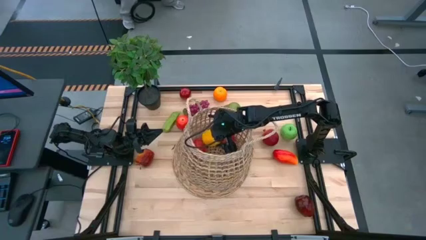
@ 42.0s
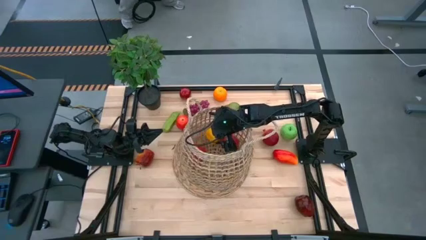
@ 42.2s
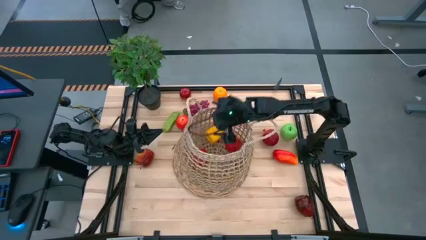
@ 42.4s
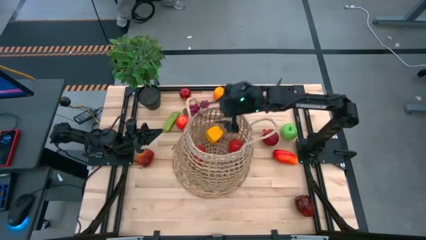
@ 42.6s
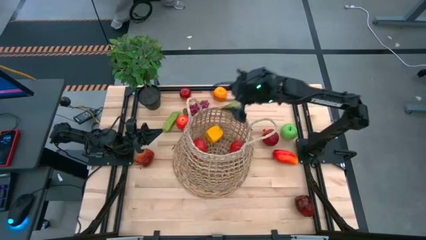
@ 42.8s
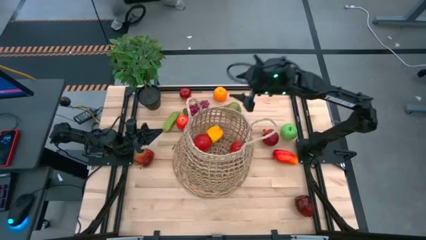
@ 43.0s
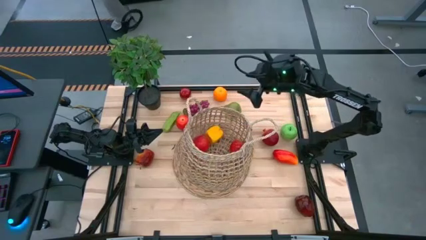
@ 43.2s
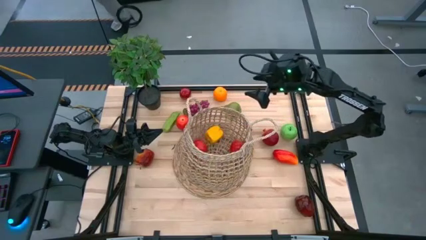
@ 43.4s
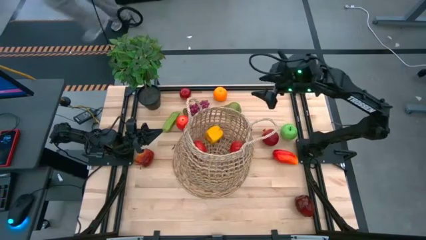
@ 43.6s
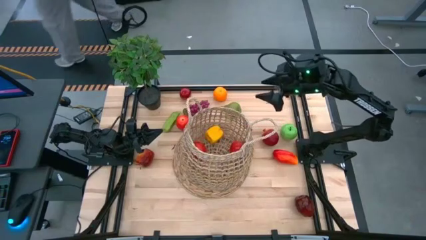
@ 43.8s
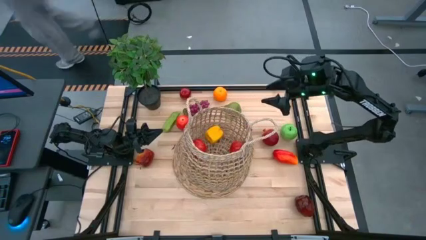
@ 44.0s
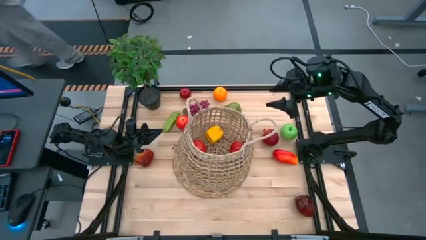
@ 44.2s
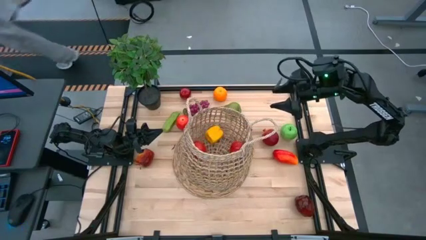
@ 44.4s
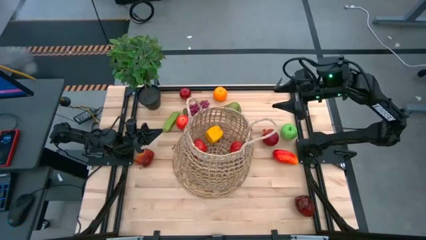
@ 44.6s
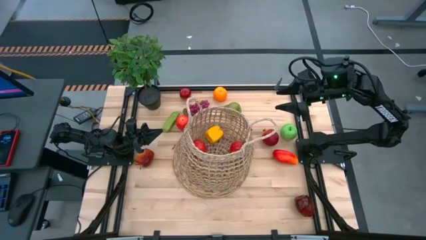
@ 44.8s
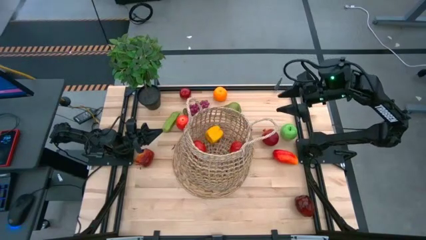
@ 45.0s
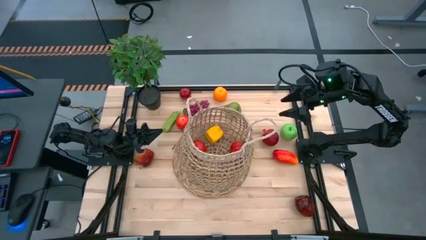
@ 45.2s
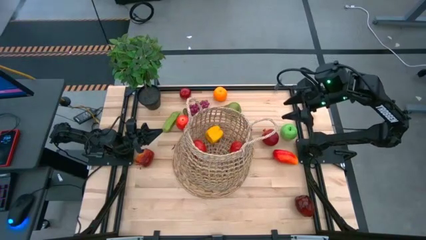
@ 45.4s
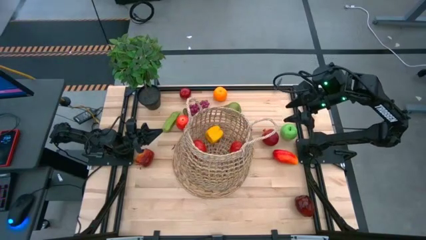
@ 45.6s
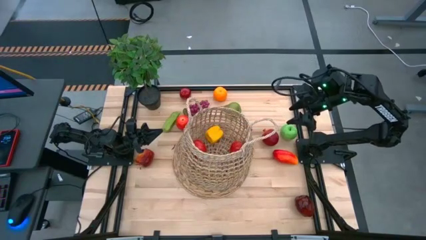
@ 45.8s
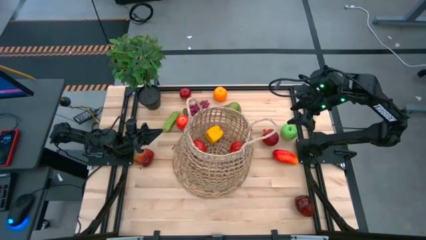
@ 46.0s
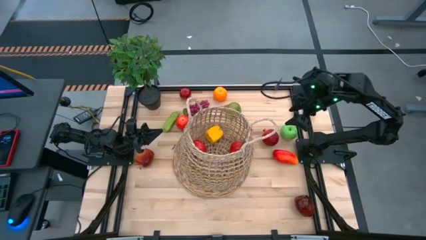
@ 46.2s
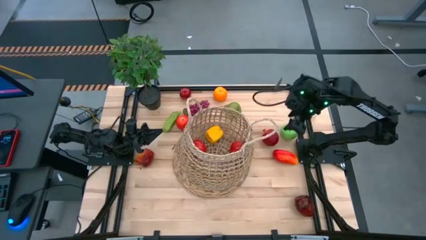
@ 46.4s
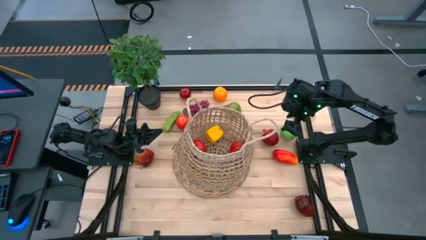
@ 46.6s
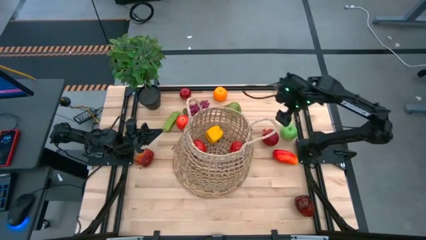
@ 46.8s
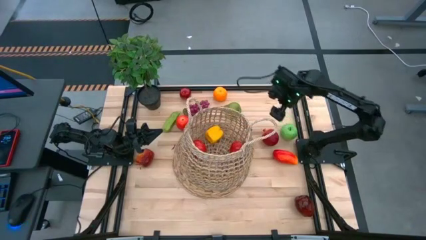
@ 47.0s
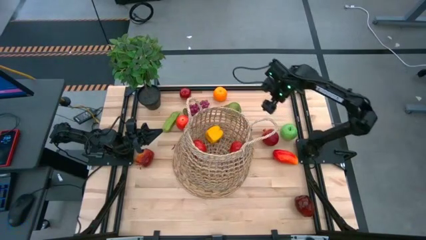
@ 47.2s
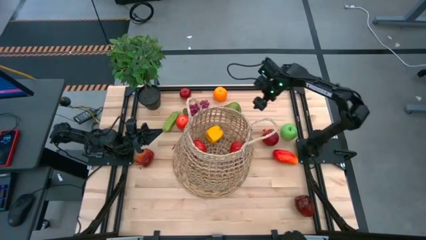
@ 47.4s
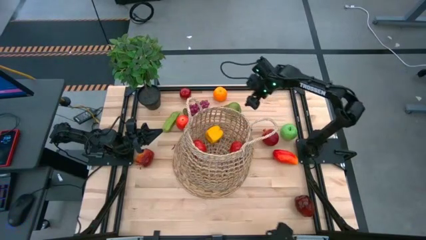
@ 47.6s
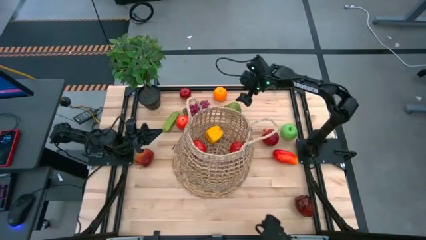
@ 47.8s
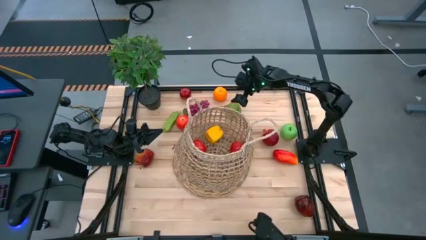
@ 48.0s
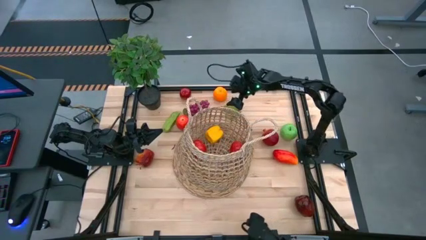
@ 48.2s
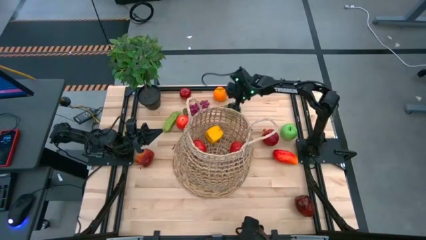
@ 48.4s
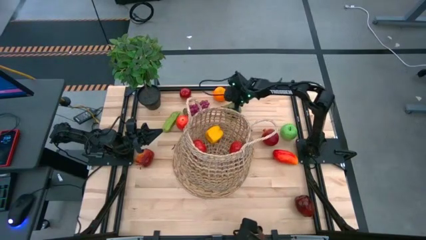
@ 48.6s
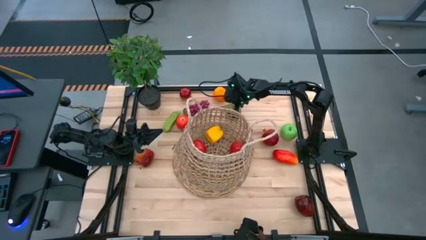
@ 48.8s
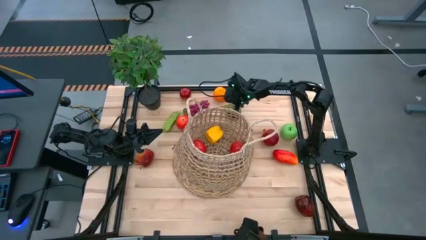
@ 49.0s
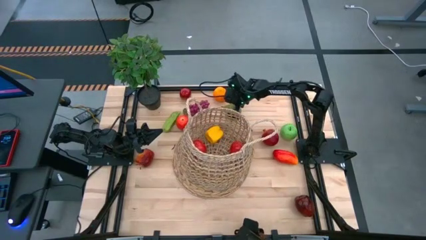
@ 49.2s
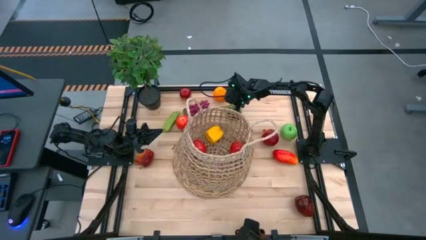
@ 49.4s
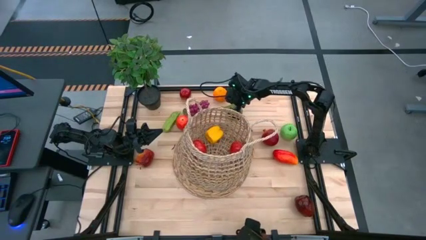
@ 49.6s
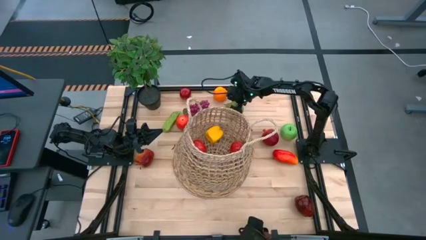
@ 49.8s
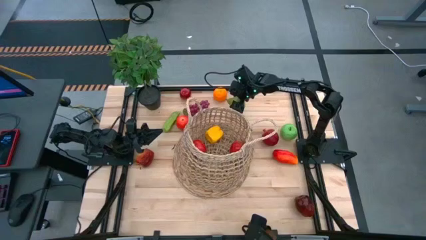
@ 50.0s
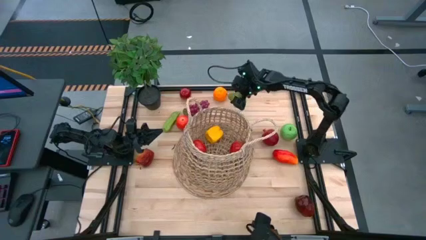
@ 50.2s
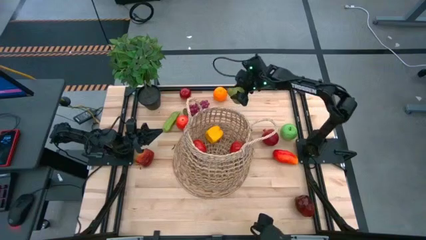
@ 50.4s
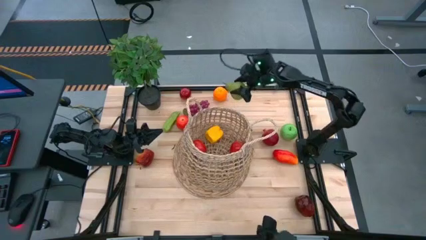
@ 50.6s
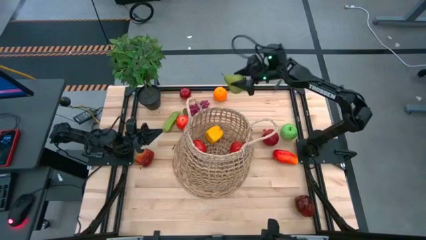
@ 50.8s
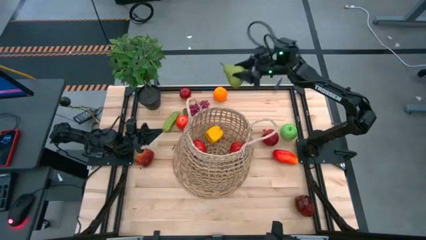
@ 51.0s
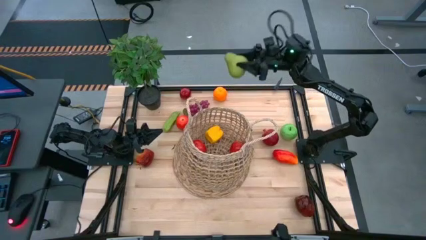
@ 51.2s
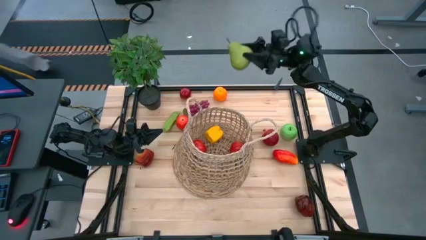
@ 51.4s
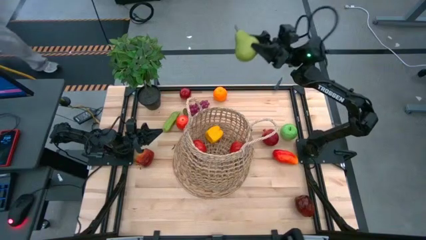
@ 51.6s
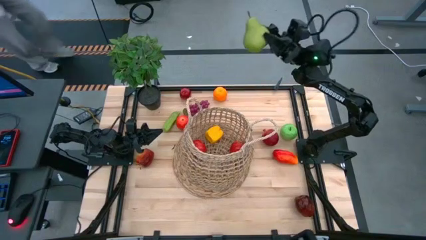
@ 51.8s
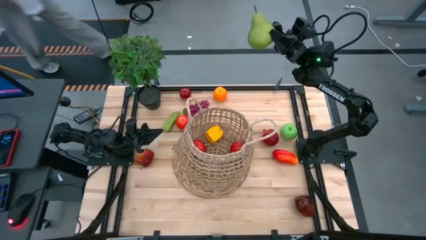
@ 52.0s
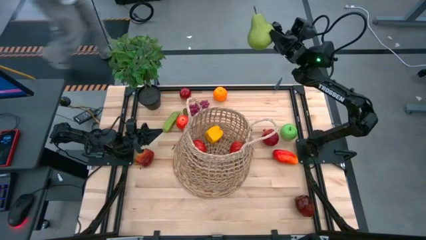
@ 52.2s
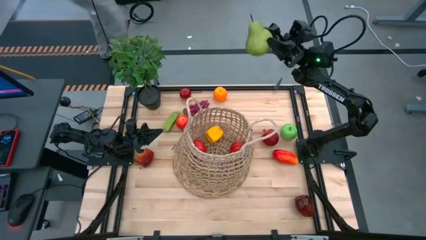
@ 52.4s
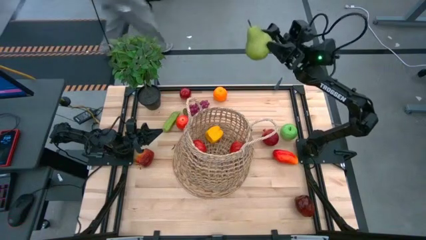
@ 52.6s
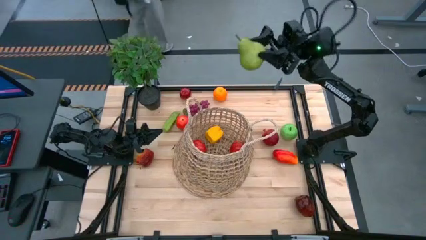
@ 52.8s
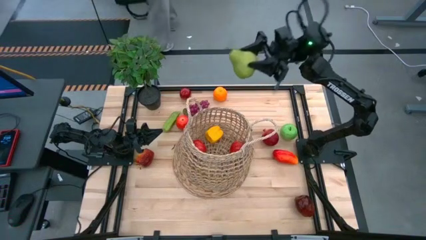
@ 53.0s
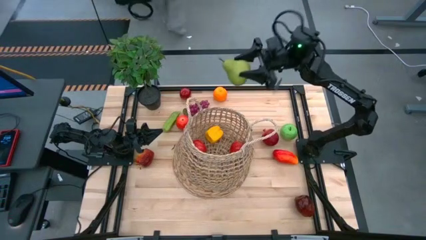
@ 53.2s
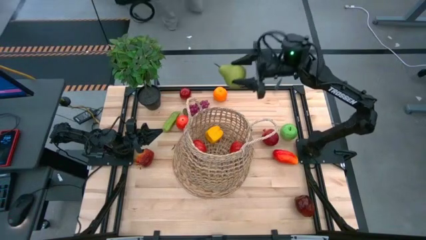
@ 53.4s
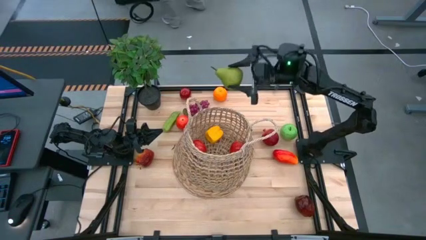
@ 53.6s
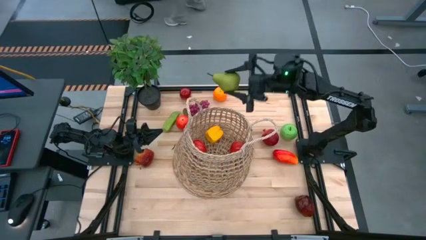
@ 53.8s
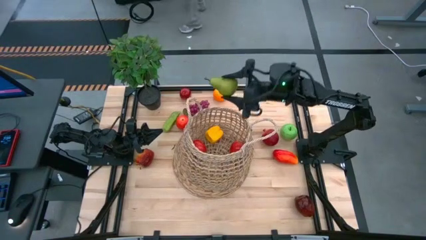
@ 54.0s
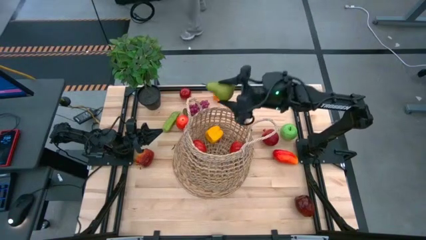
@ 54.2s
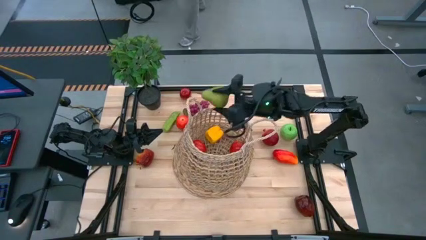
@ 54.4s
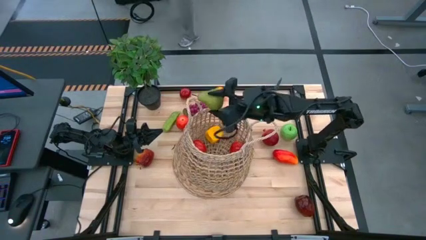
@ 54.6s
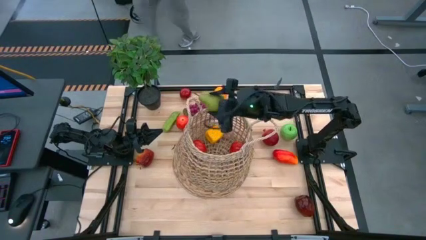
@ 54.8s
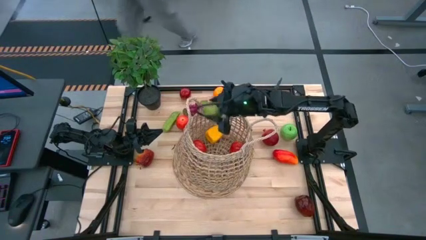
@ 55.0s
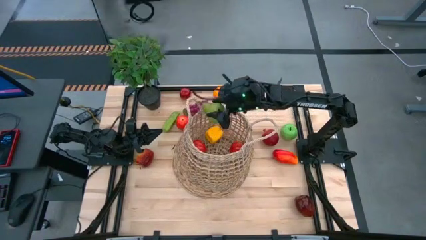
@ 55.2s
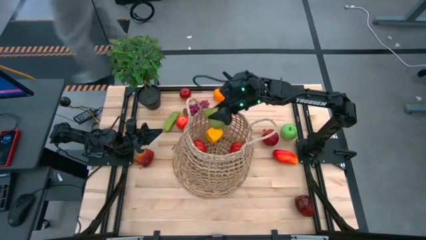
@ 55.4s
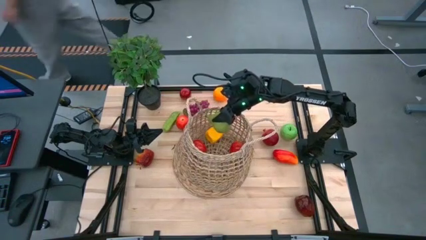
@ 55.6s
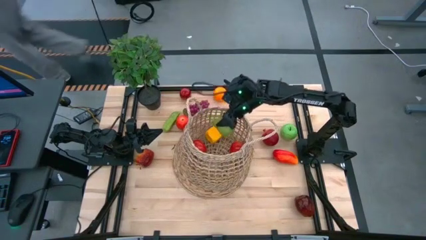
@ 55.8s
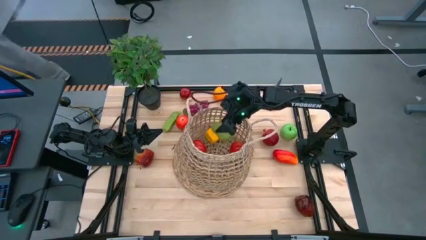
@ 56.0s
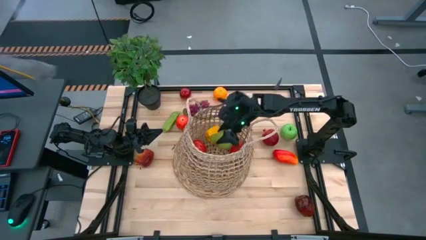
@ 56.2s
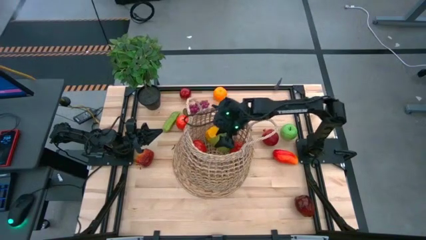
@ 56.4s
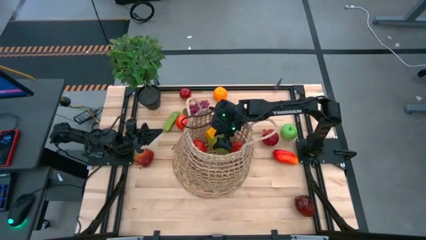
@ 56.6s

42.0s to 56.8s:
Task: Build produce basket
Put the green pear into the brown basket

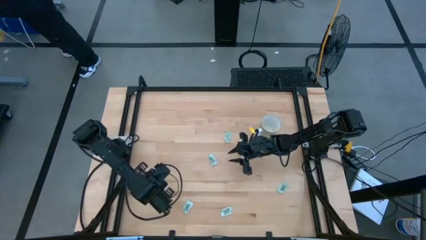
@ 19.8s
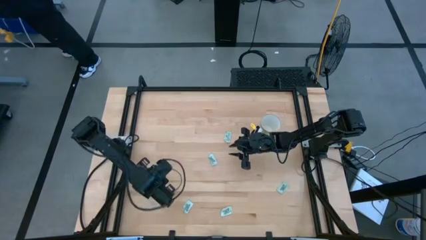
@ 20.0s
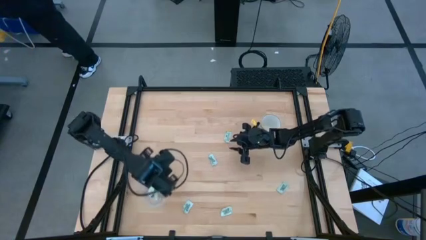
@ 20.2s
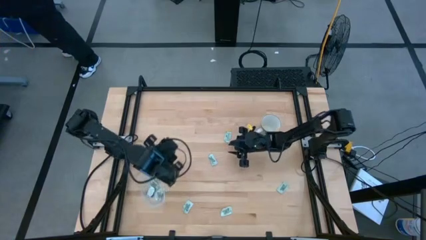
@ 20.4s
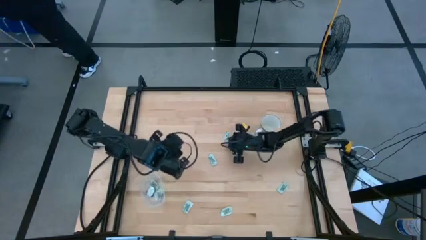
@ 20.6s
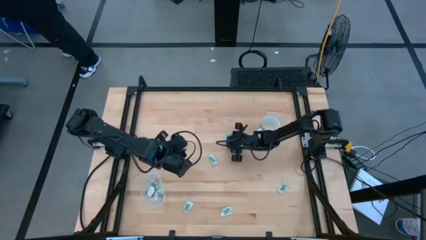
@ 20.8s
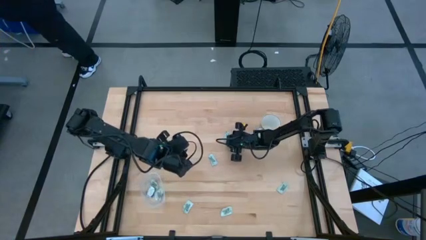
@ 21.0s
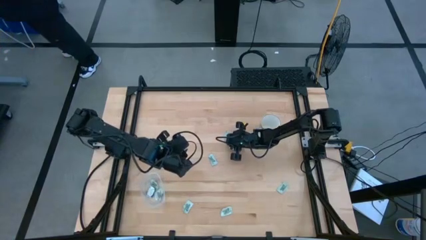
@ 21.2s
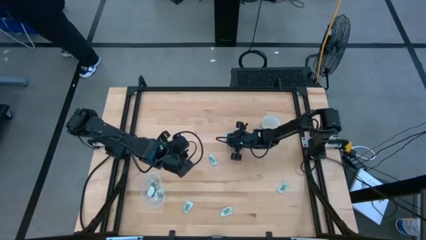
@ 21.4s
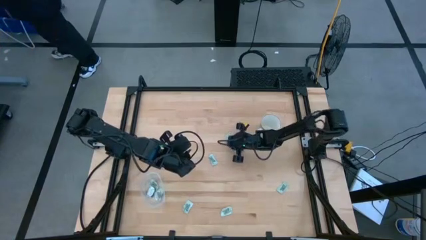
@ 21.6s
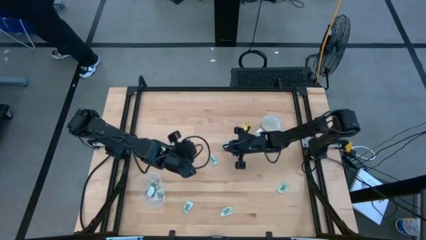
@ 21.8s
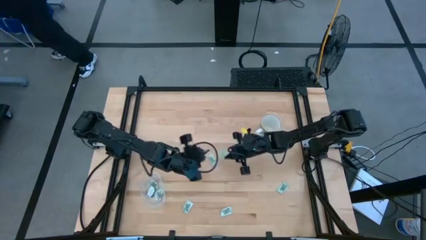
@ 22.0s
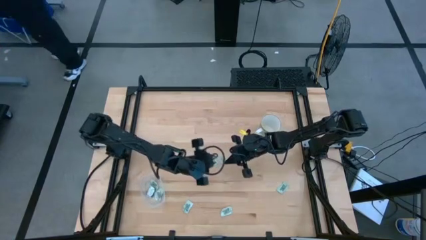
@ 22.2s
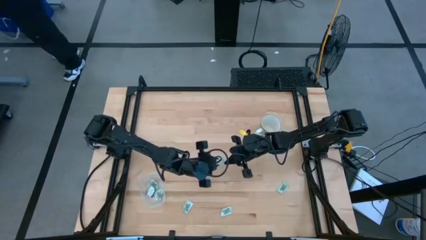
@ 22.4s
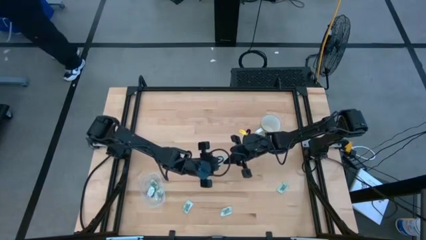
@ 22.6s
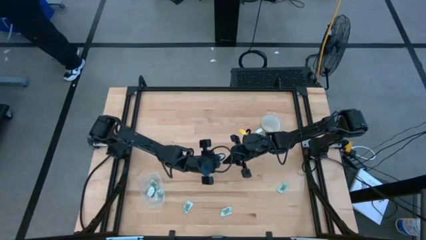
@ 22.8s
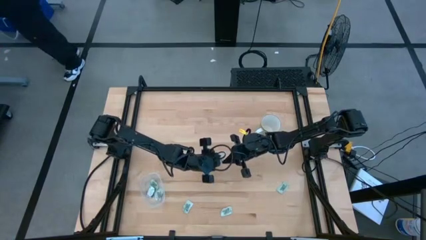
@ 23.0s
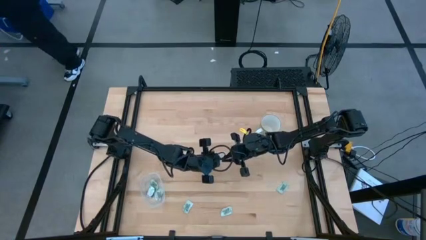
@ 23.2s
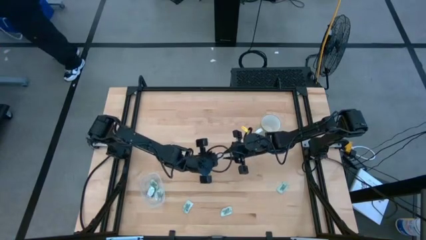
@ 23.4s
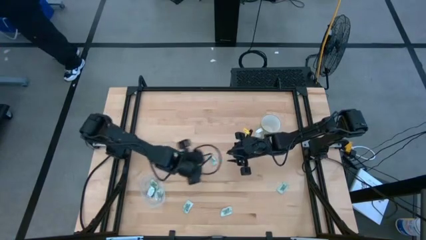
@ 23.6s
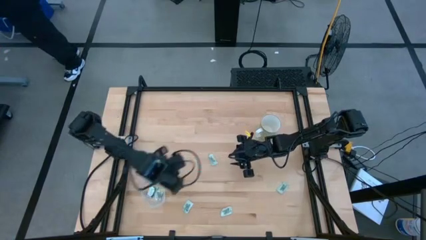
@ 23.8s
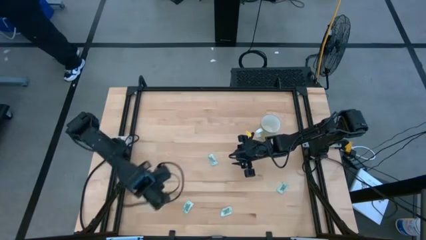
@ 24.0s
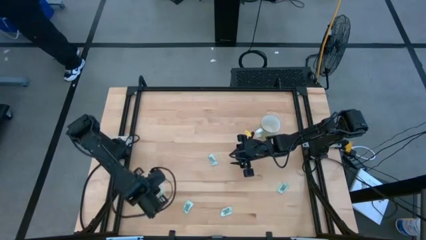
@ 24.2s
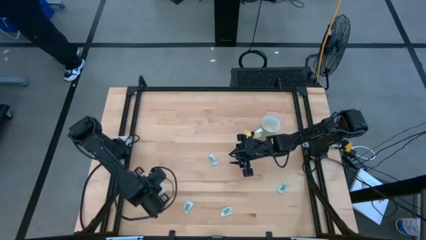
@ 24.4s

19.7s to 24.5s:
Task: Pick and place Stevia / Truvia into bins
Put the stevia packet into the transparent bin
